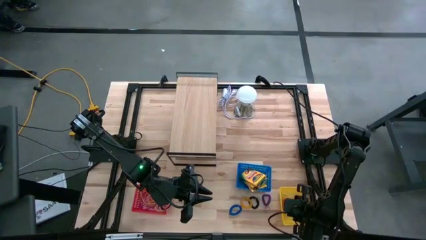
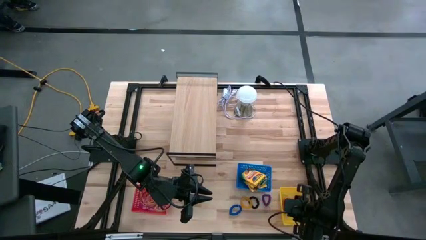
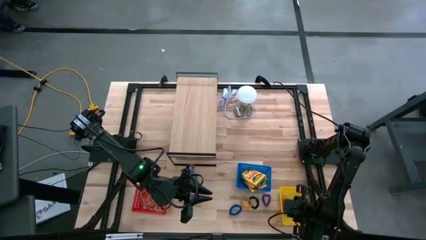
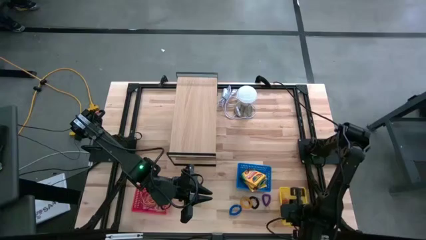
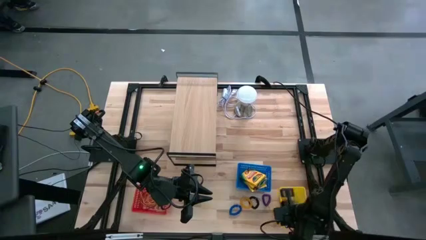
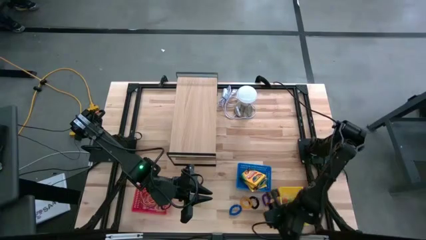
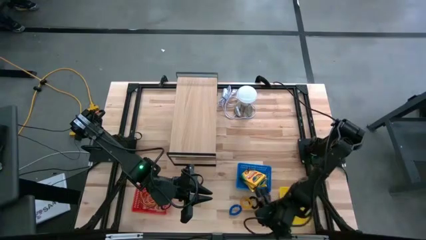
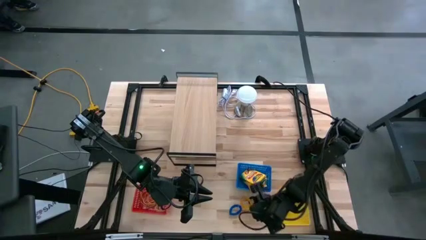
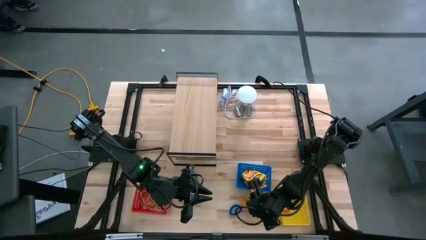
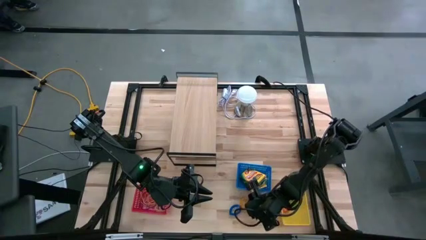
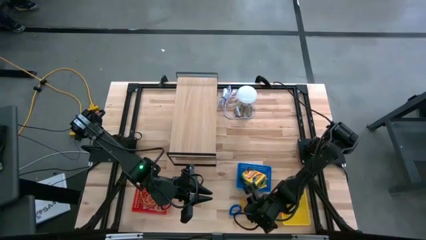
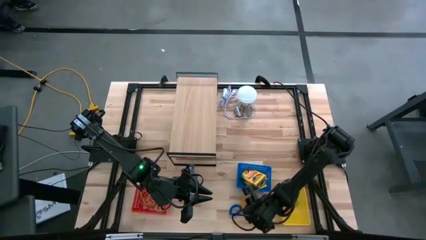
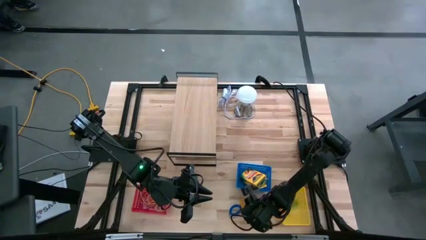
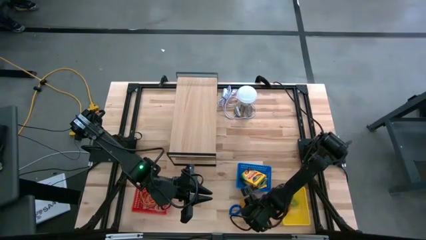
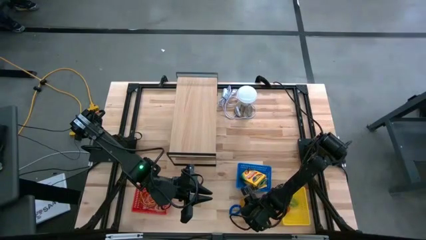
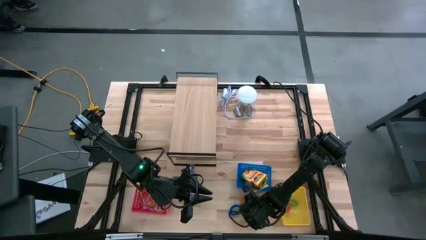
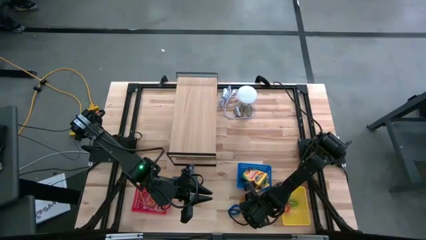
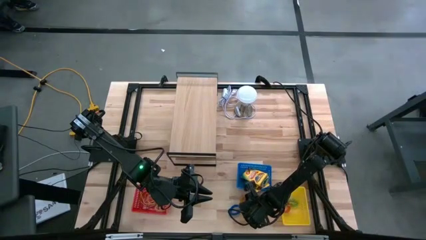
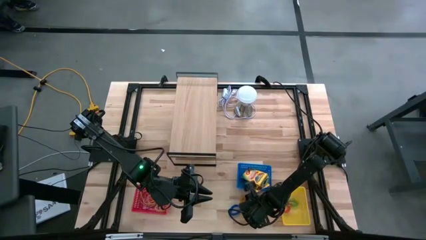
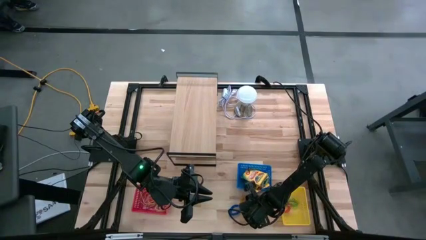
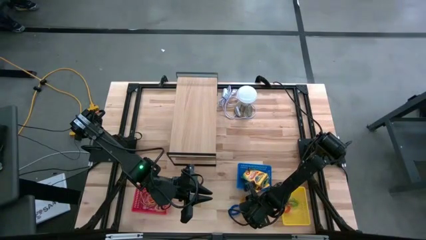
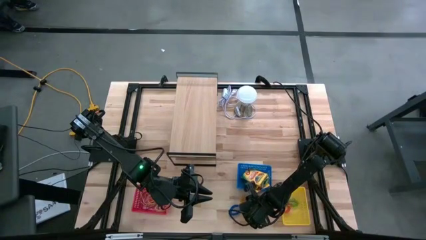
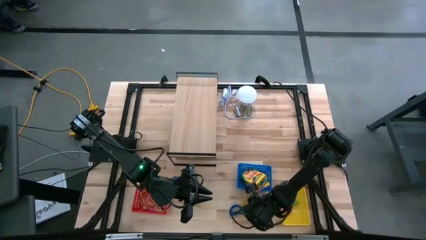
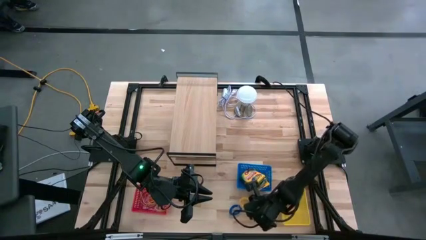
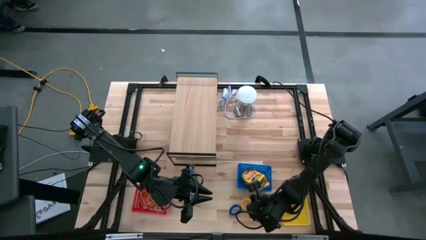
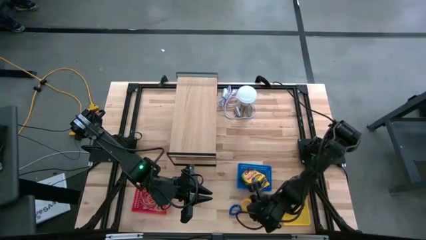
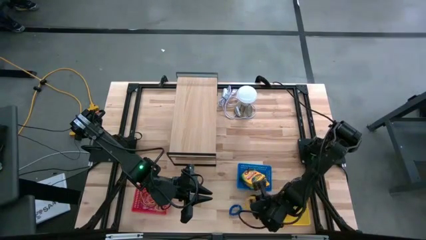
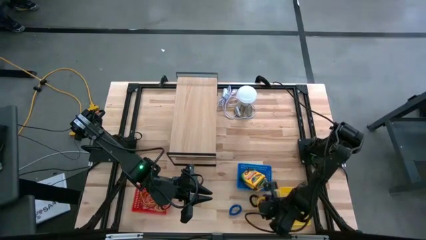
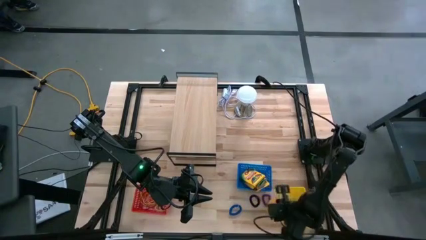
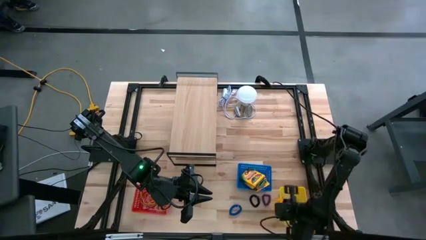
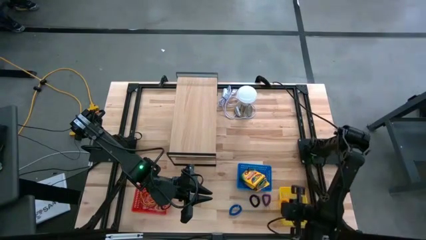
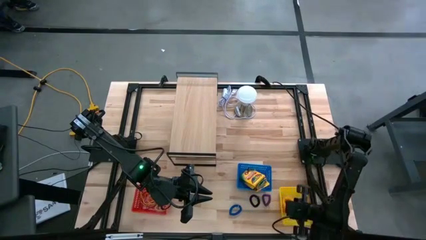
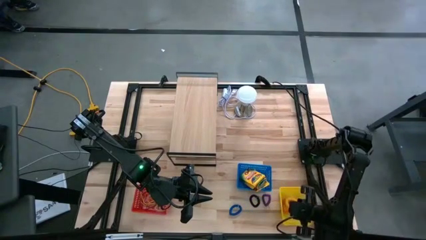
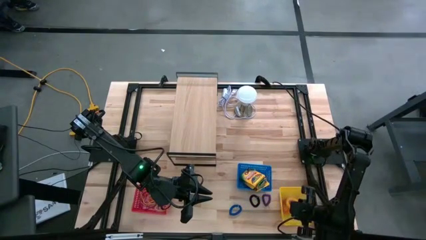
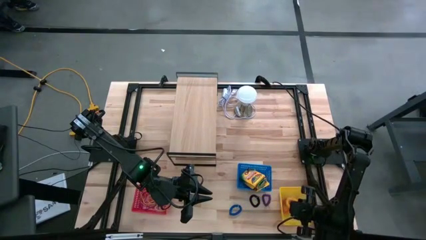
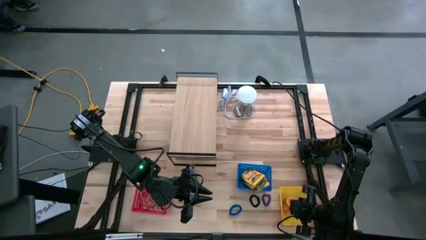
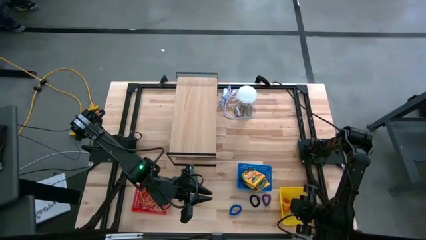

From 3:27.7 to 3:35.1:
Task: Pick & Place Office Desk Supplies
Put the yellow spiral keychain into the yellow bin

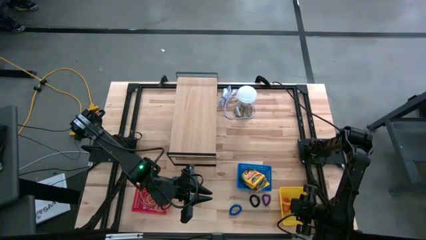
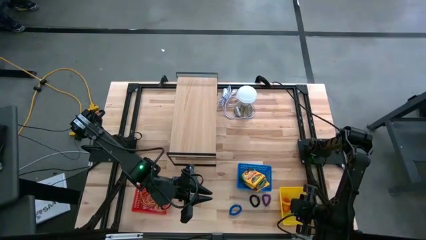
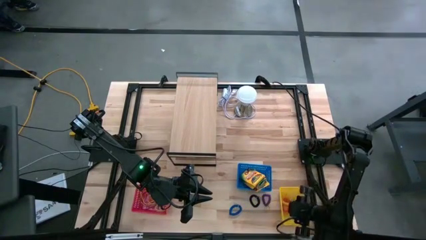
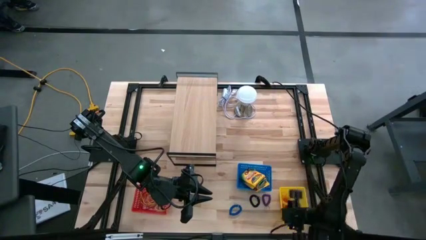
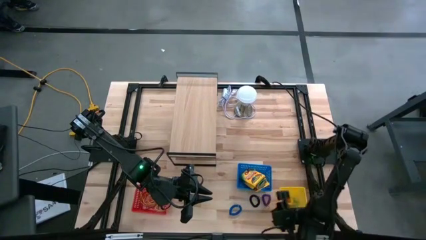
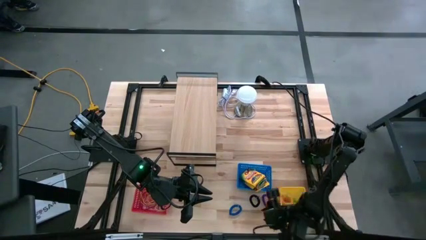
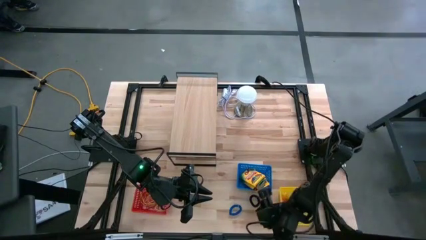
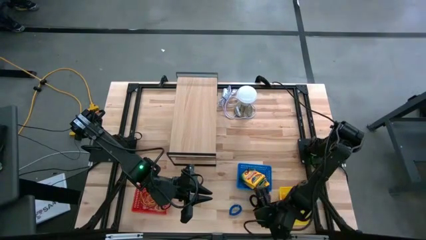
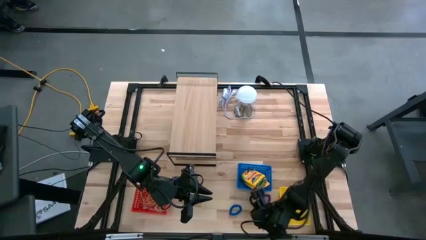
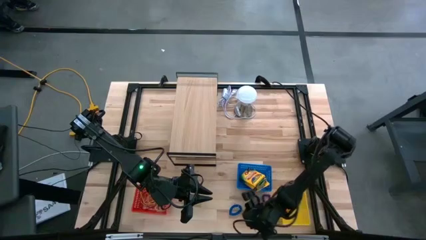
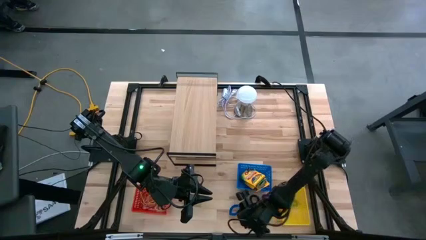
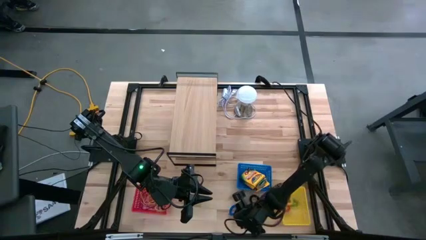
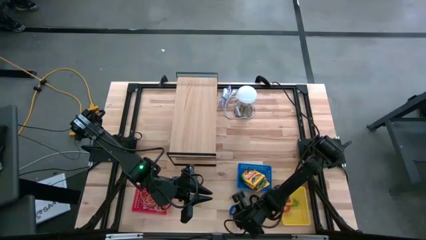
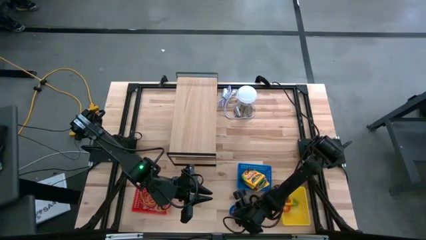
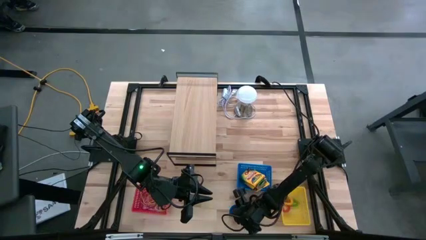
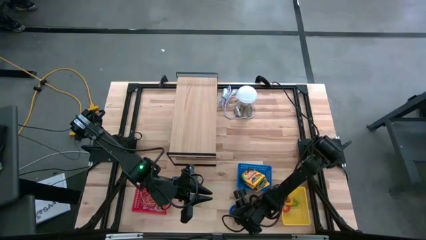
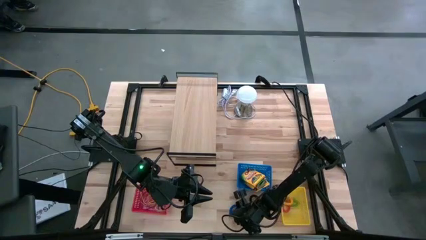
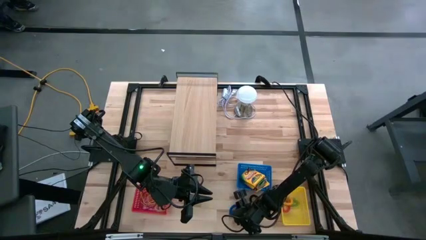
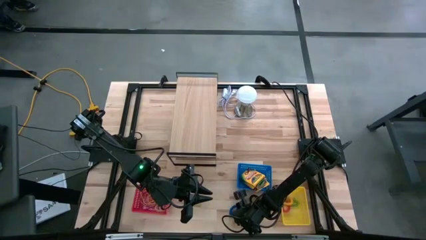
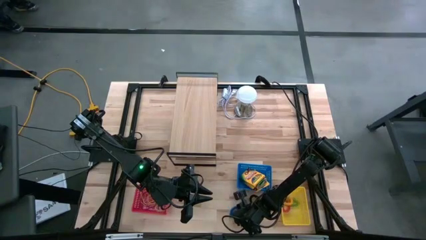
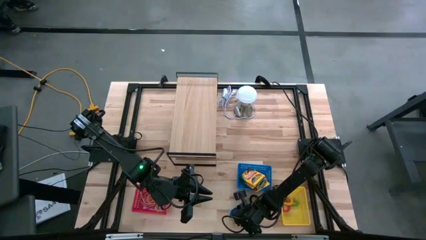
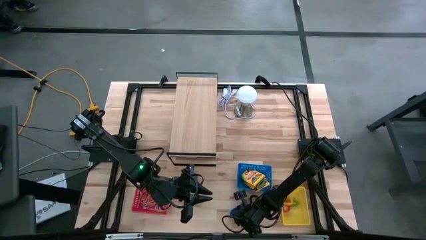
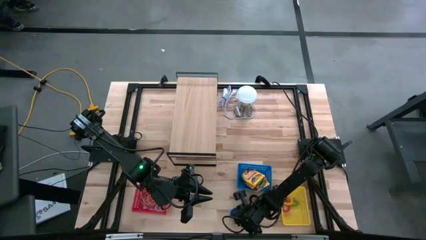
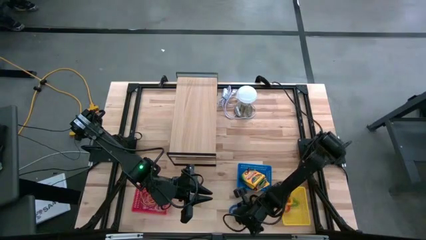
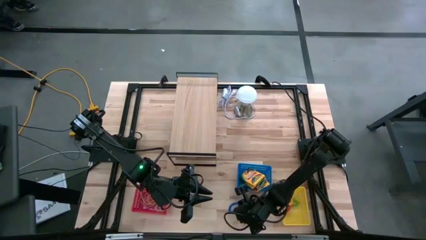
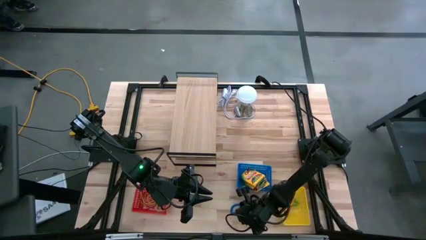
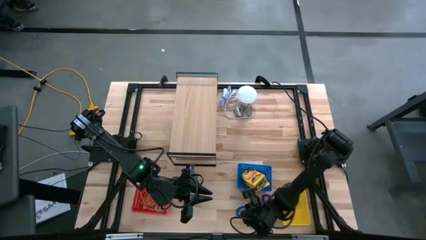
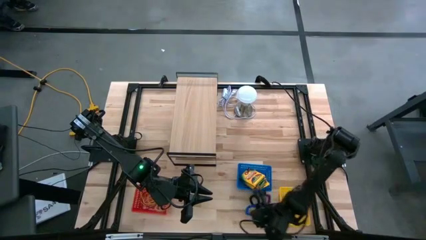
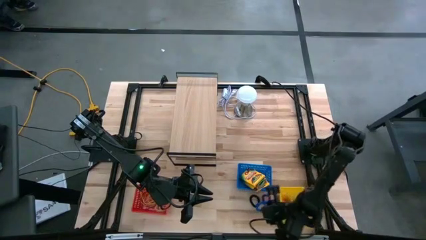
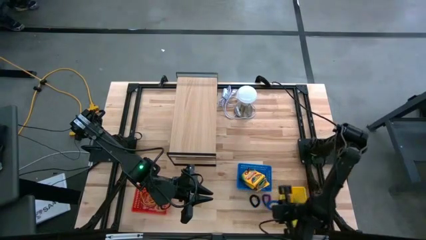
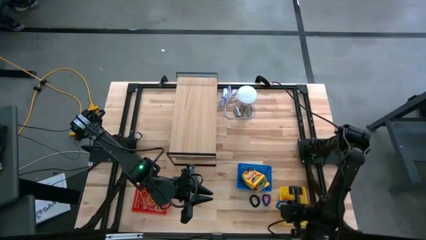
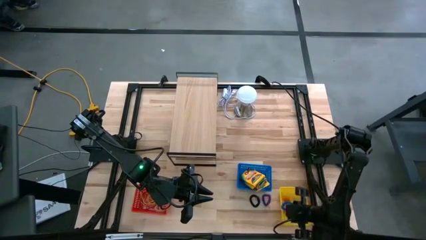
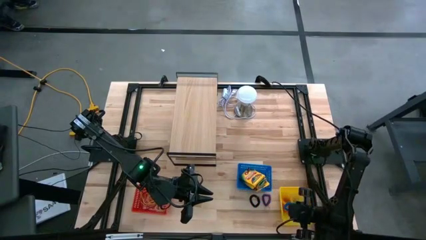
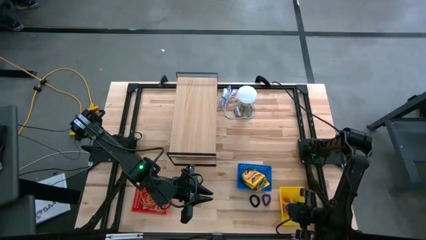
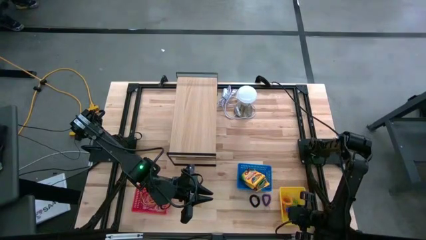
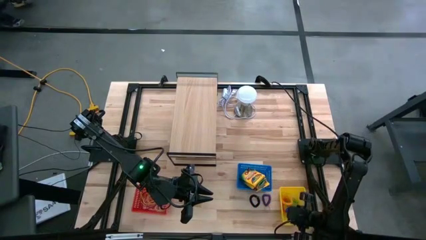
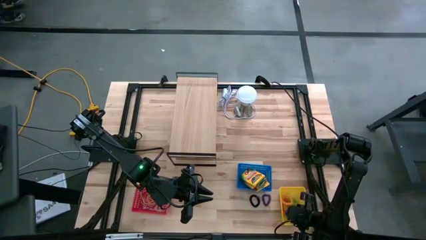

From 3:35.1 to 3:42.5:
Put the blue spiral keychain into the yellow bin

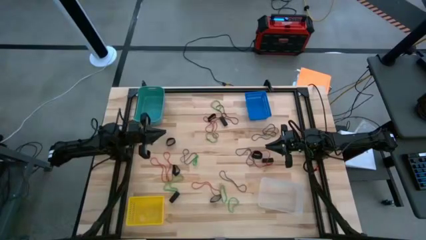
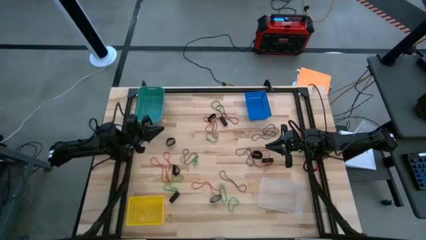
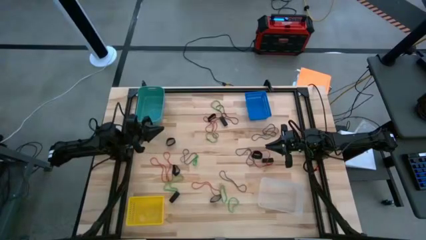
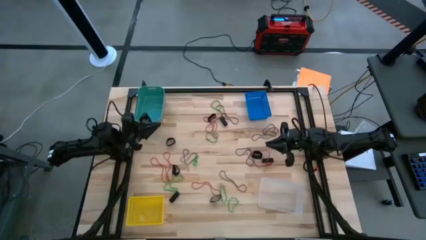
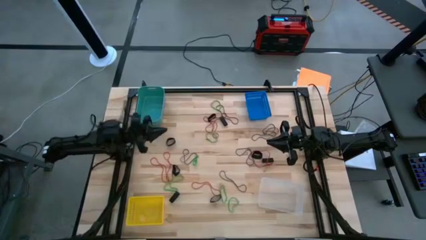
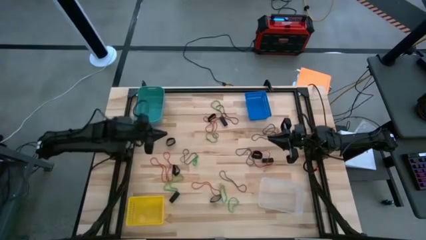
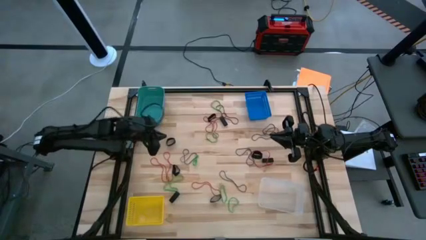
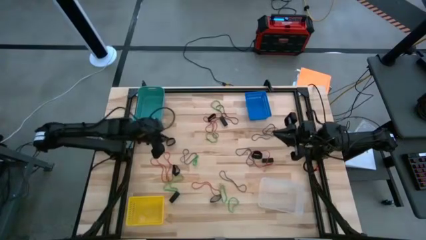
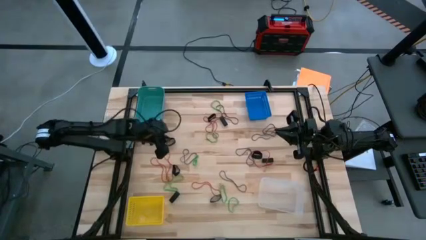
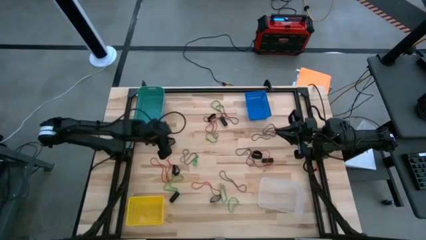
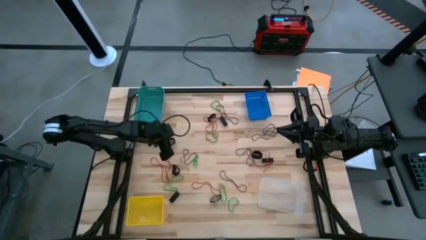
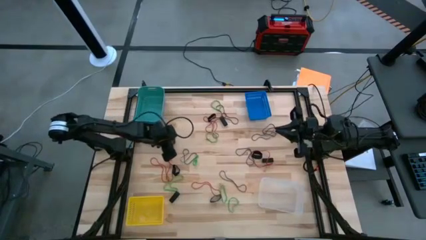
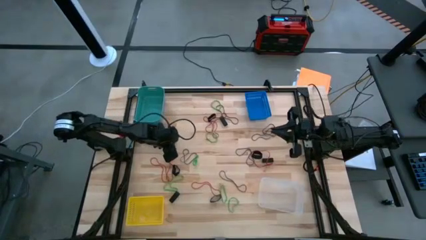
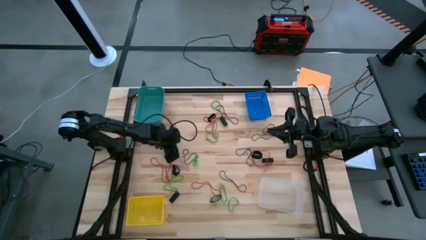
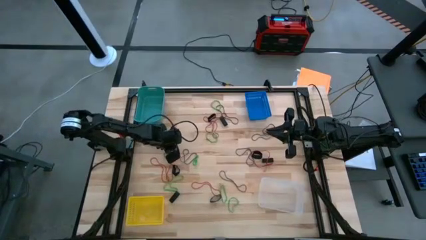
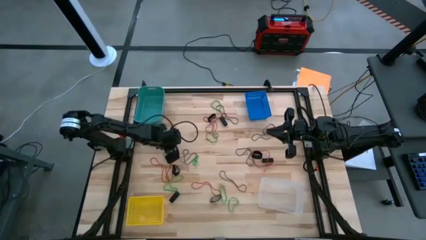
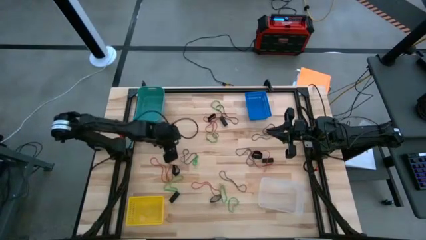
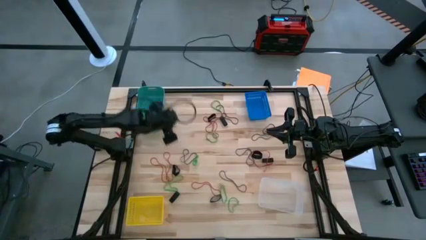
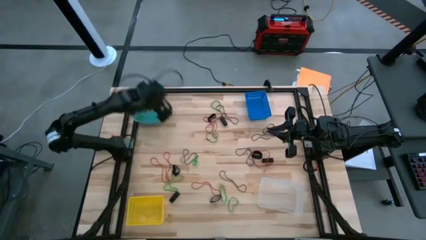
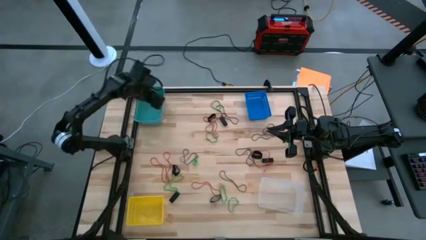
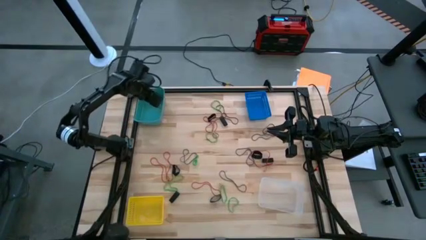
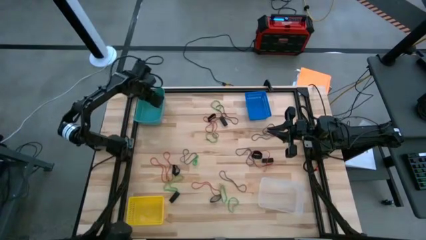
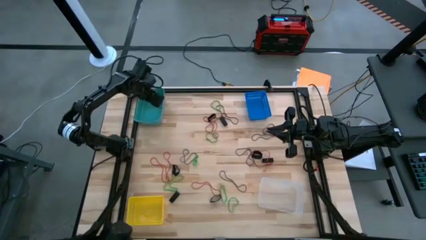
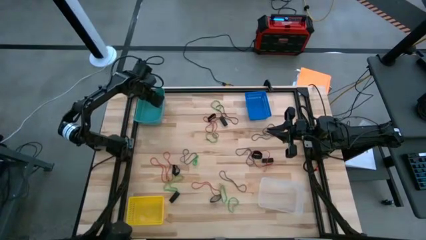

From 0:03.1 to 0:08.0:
Task: Sort rubber bands into baskets
Put the thick black rubber band into the light blue bin
